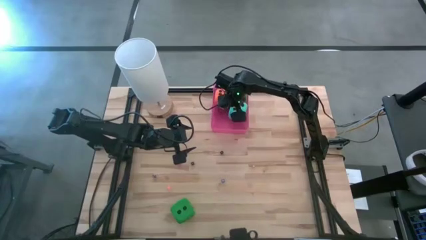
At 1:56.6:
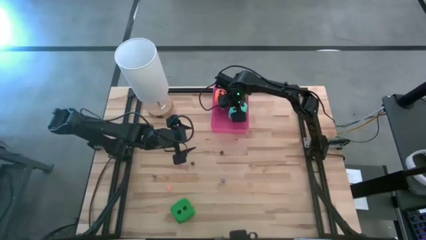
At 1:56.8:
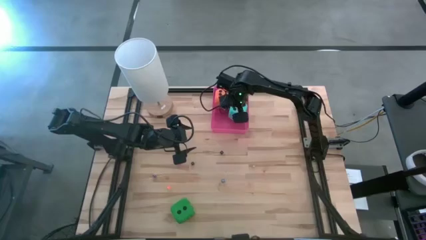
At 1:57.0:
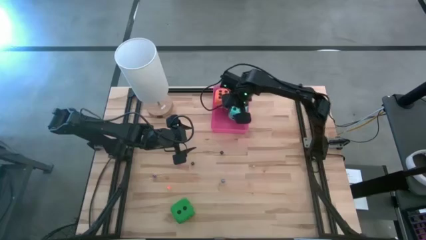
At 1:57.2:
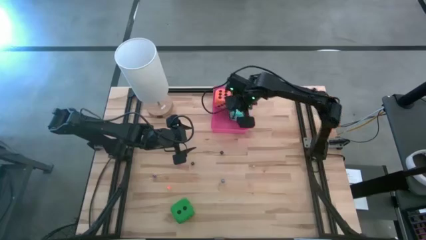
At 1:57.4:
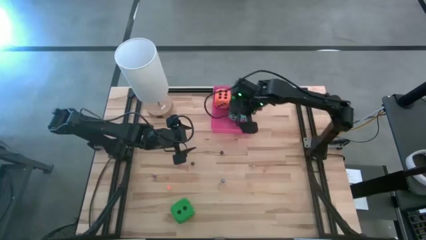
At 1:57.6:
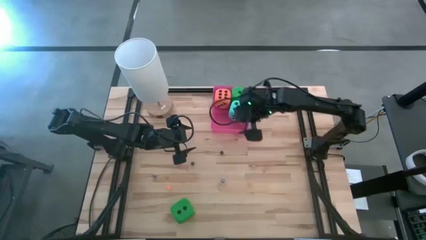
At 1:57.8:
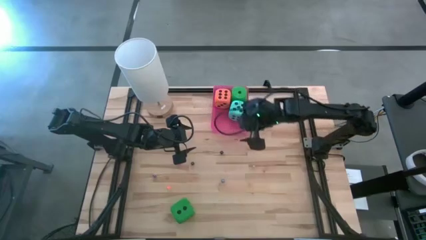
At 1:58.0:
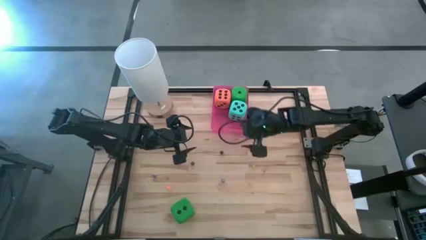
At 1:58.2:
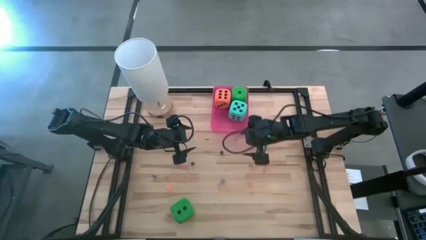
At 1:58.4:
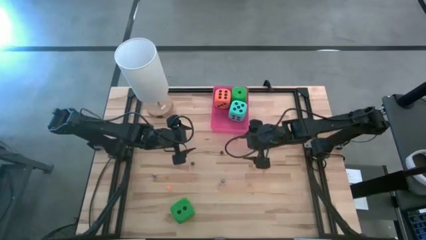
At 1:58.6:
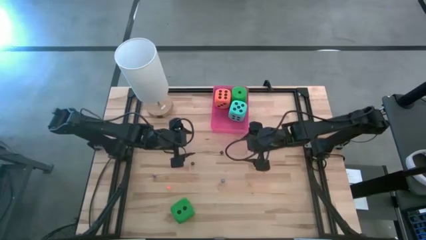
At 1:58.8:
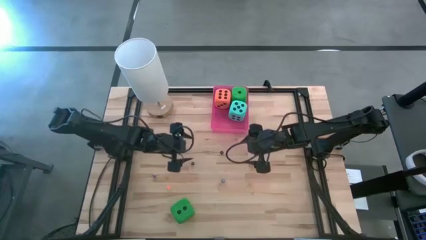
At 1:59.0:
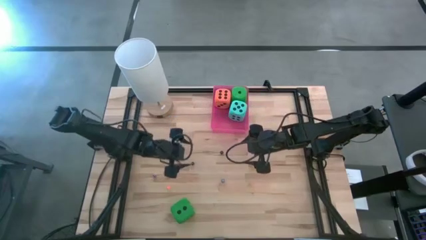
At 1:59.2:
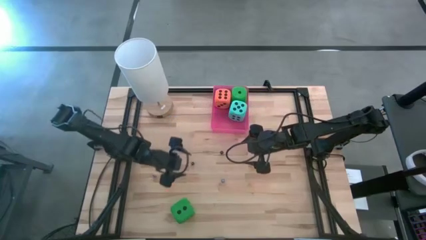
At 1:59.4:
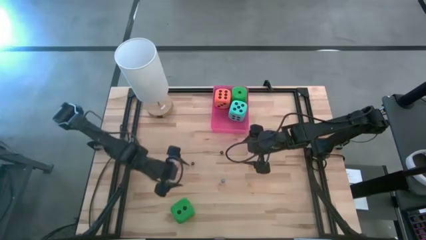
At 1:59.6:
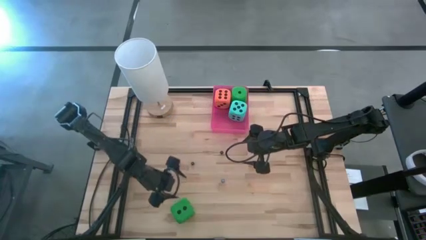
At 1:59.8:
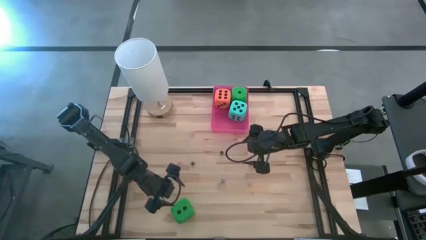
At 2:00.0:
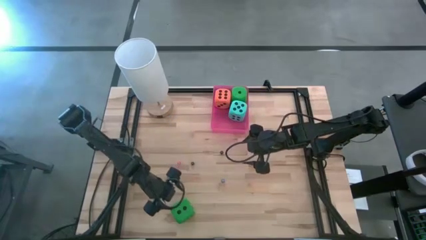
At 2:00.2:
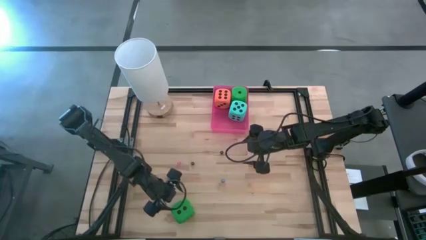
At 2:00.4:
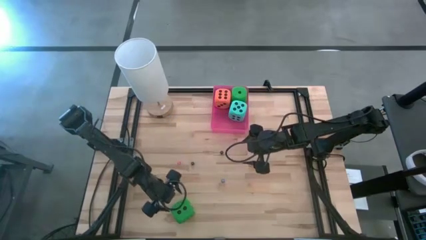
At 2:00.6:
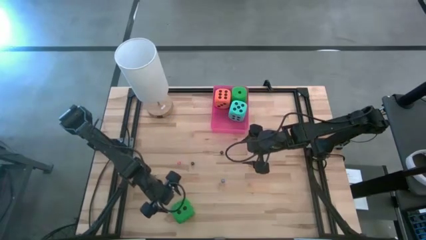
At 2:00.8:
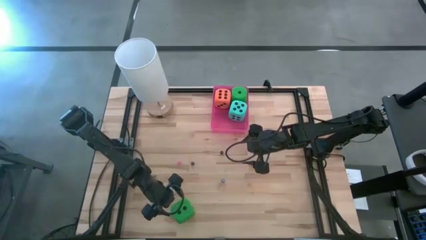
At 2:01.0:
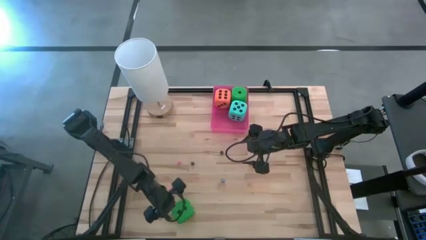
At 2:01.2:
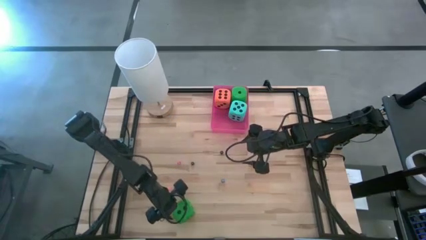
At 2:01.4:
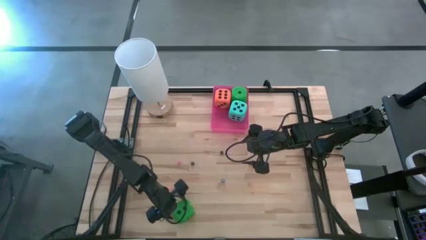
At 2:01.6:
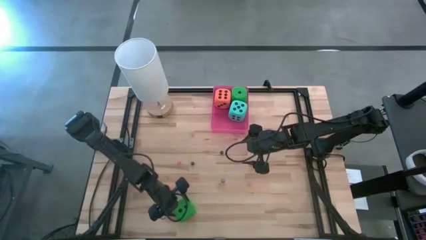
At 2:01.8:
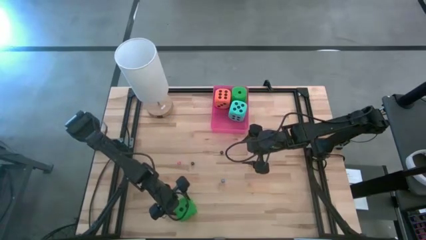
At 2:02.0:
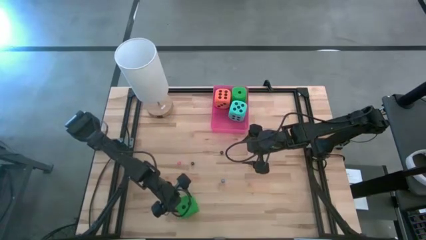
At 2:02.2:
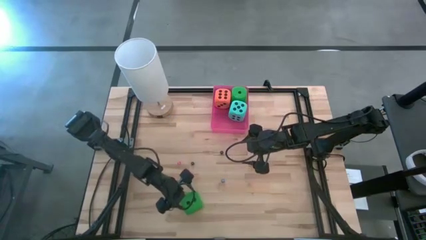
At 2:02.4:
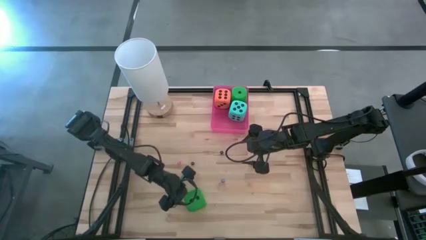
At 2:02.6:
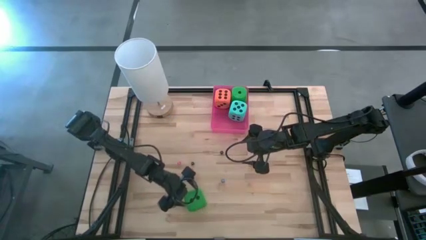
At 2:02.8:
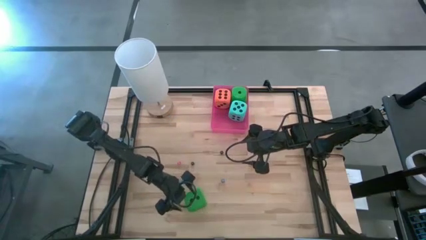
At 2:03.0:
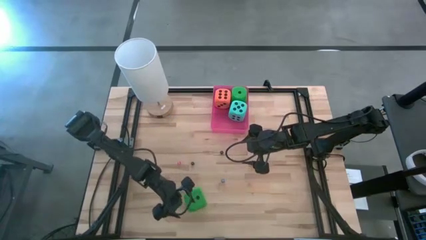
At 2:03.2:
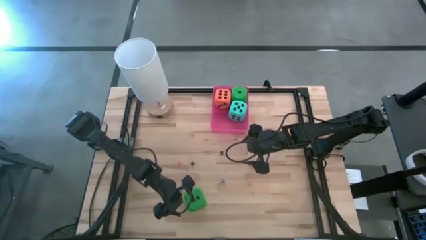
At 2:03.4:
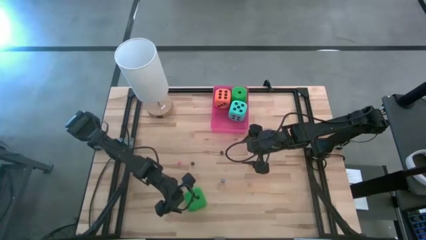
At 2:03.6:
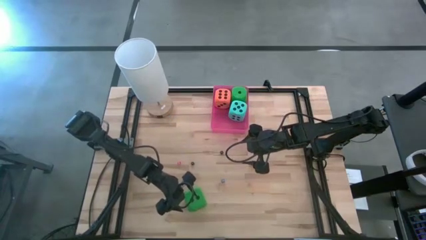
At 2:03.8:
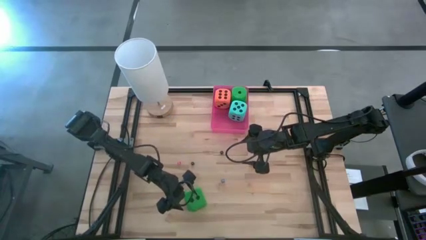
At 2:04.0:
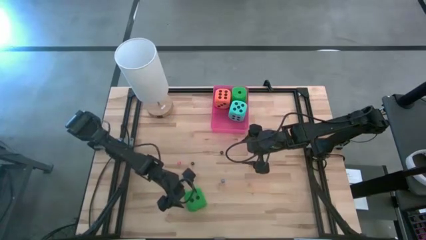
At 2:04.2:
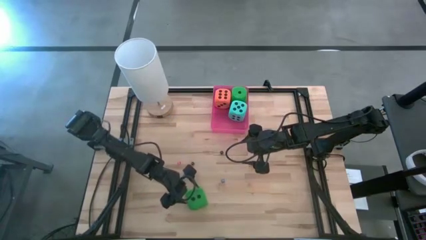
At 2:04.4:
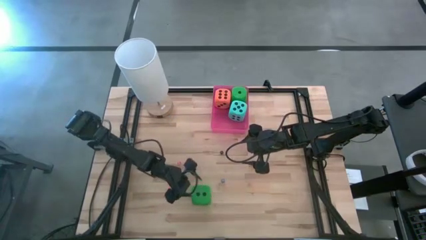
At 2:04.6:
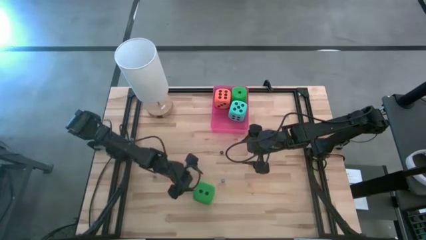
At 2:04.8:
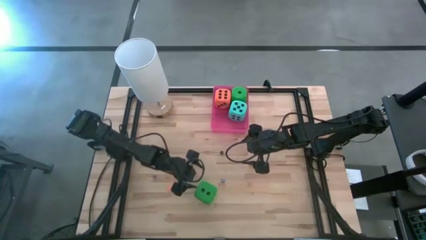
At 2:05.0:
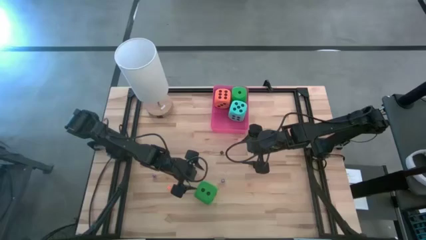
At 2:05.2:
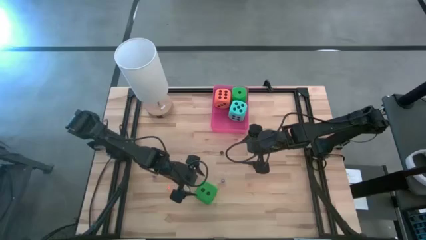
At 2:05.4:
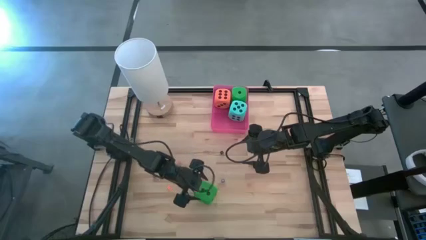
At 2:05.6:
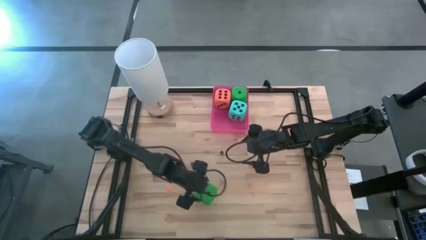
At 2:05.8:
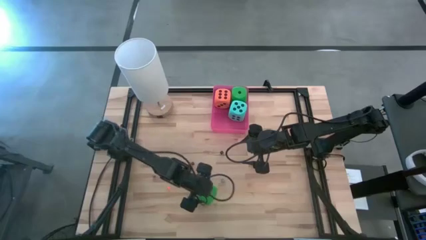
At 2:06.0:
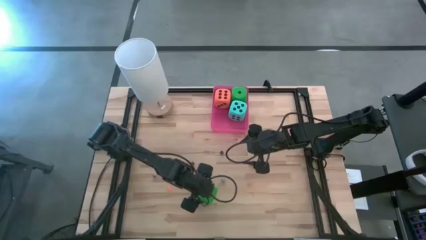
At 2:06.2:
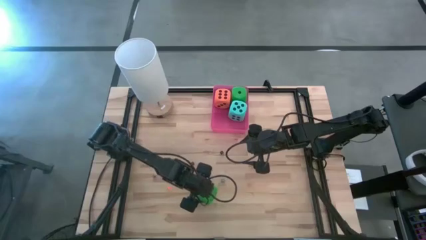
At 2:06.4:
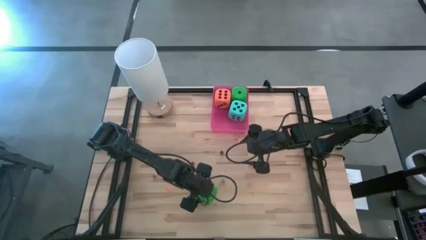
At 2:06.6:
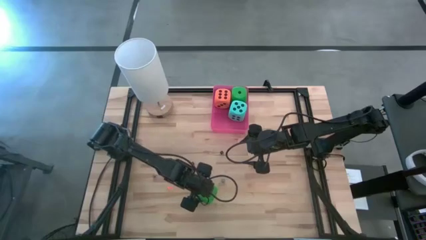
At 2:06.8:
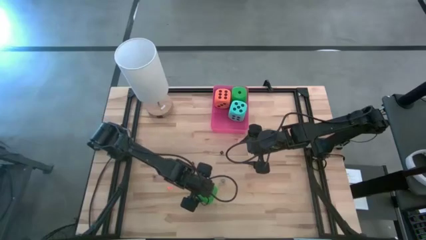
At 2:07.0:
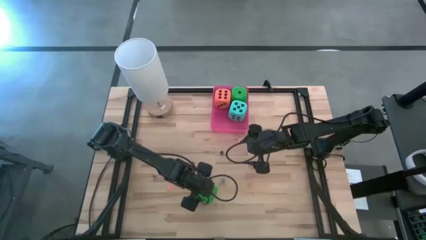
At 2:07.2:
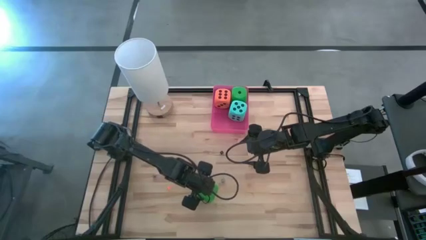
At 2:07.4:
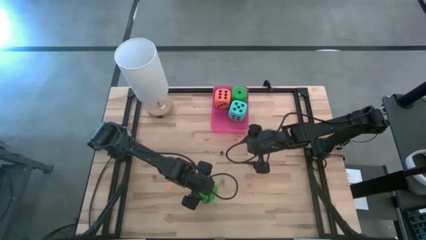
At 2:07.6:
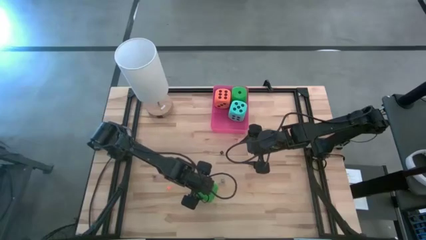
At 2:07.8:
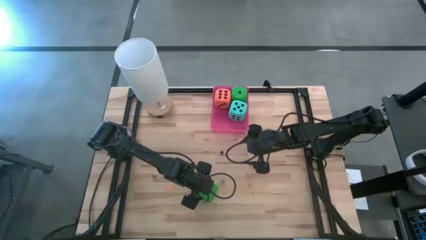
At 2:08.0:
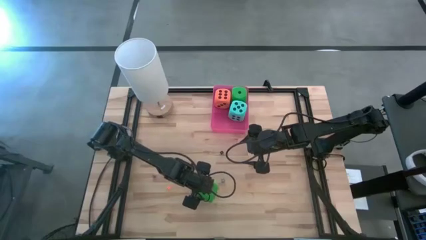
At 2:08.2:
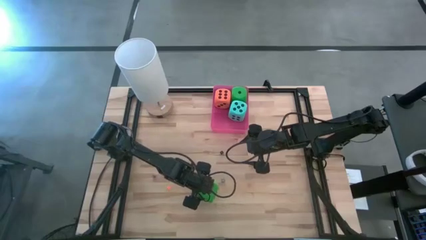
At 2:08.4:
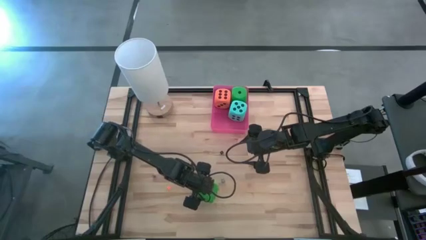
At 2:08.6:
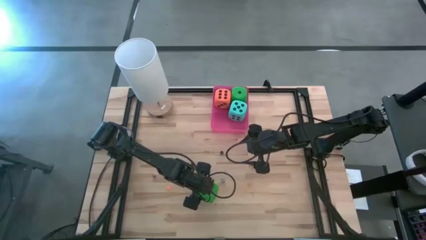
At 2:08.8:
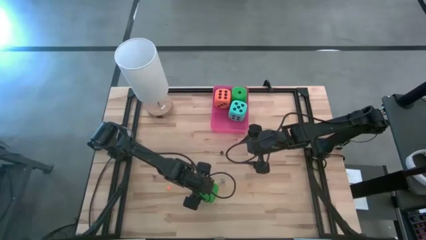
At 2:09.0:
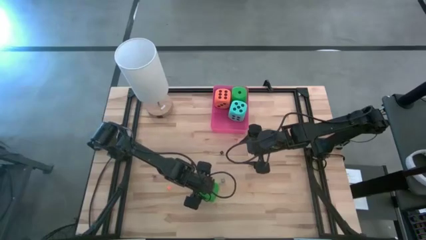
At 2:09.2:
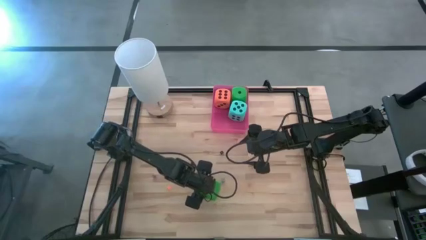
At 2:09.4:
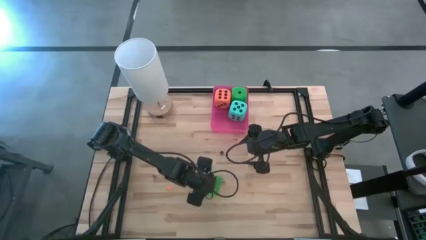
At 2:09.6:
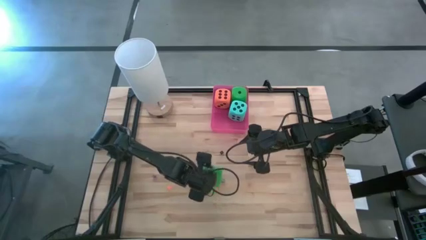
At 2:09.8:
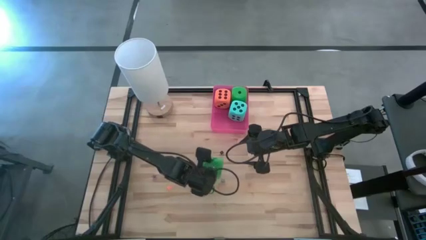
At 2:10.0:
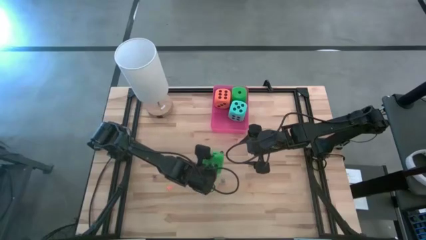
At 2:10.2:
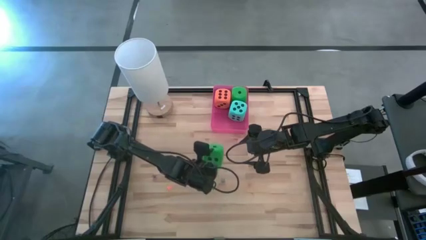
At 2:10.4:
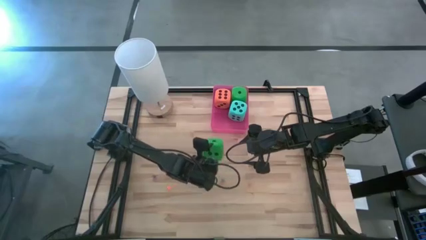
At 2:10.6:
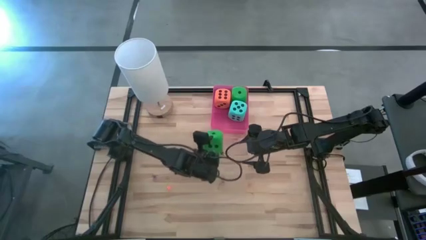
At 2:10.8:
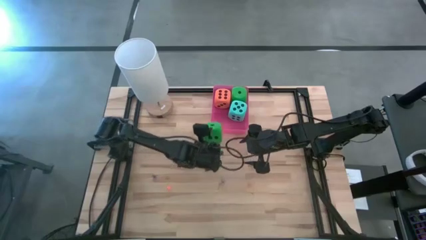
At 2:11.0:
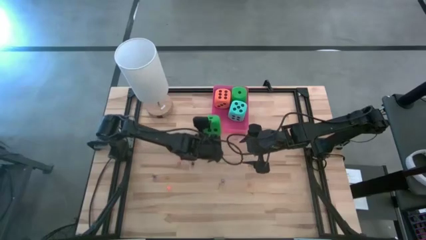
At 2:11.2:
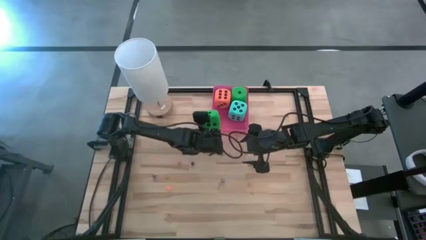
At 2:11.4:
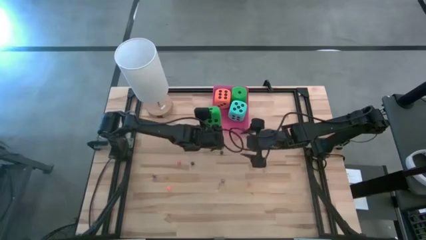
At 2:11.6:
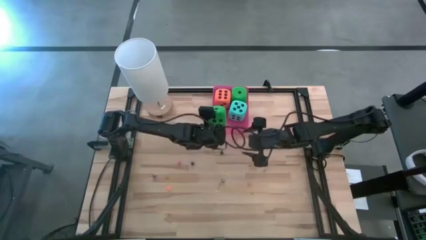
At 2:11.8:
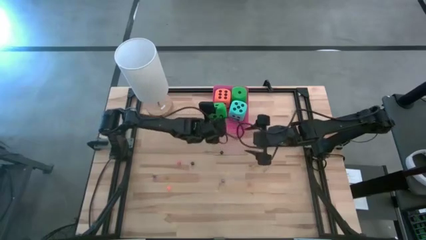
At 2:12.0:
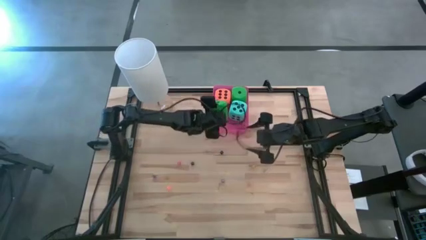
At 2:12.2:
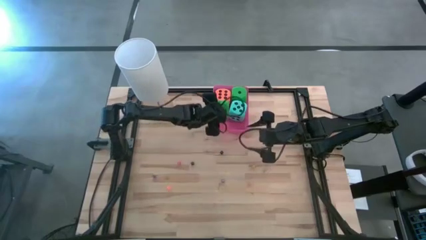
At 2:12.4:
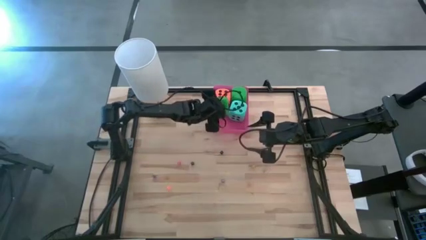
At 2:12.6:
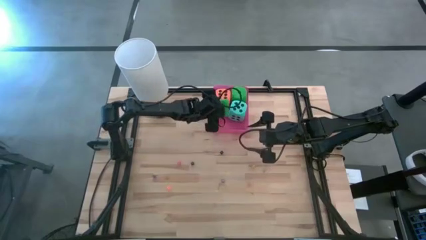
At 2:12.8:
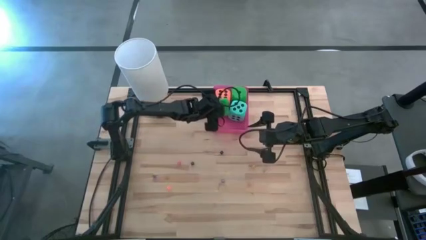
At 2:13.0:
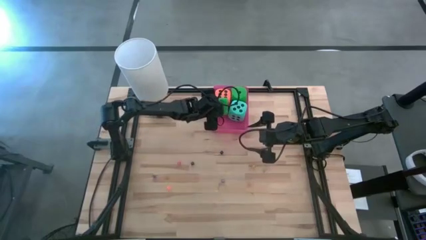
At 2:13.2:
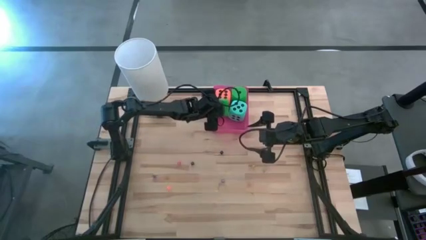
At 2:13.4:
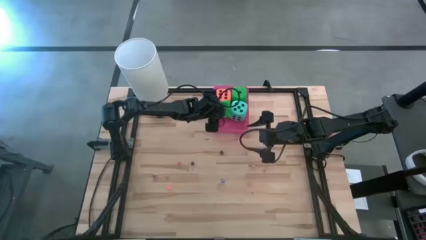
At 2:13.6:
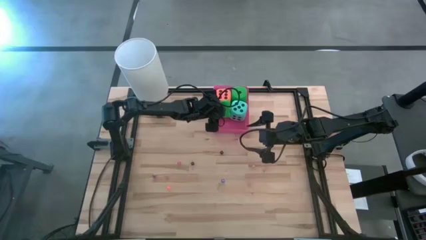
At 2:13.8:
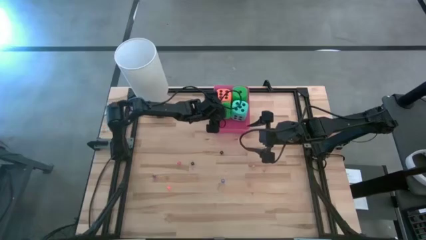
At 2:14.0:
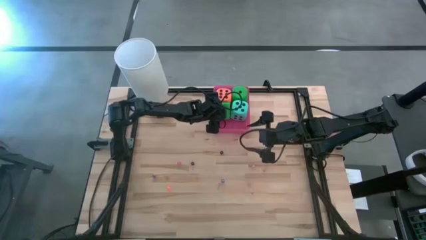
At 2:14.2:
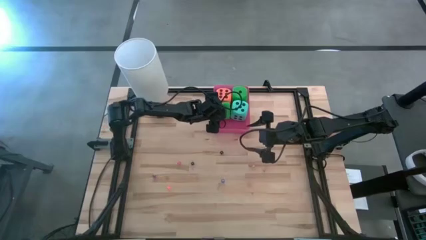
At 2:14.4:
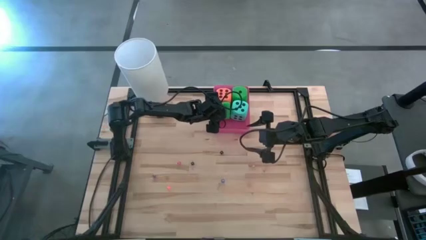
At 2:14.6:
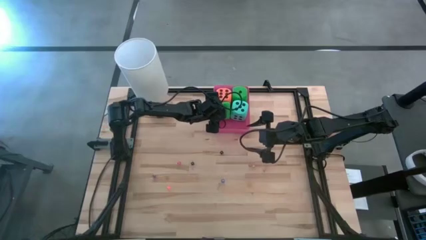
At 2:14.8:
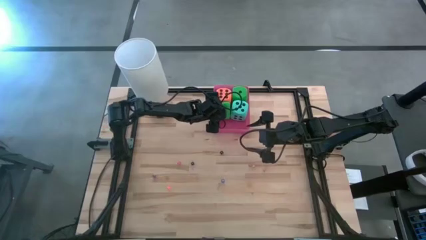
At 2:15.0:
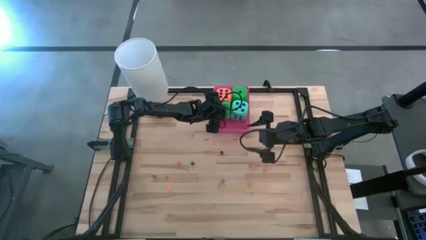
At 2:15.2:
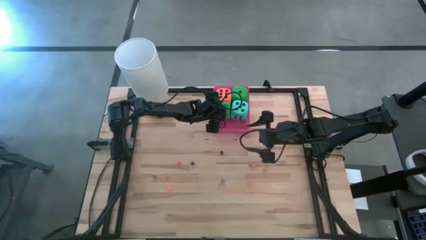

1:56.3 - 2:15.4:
Task: Pick & Place Dice
Put the big green dice into the red container
